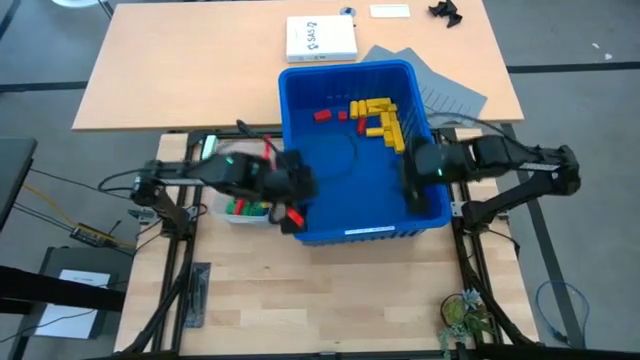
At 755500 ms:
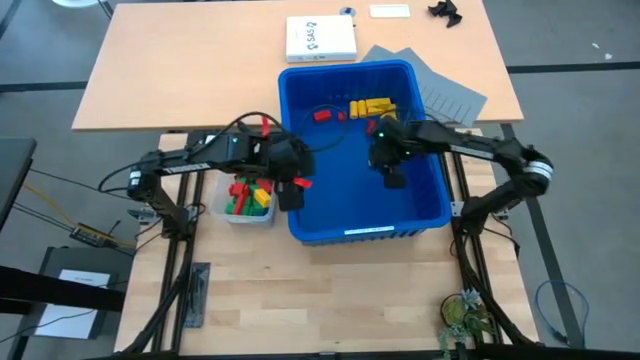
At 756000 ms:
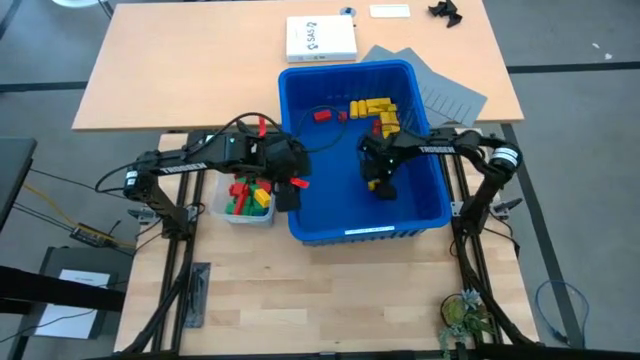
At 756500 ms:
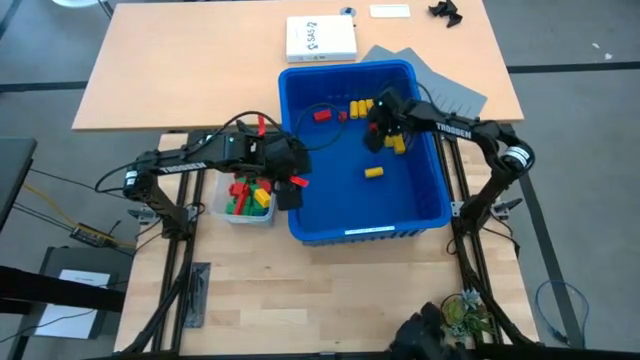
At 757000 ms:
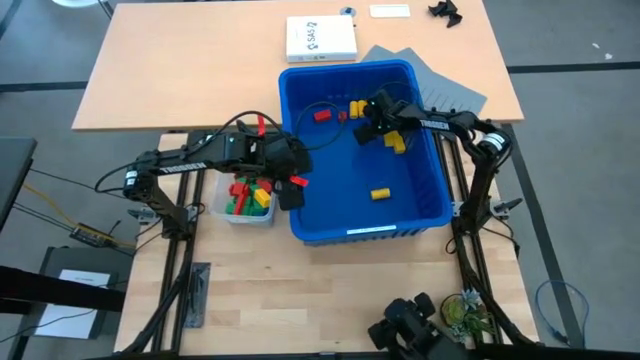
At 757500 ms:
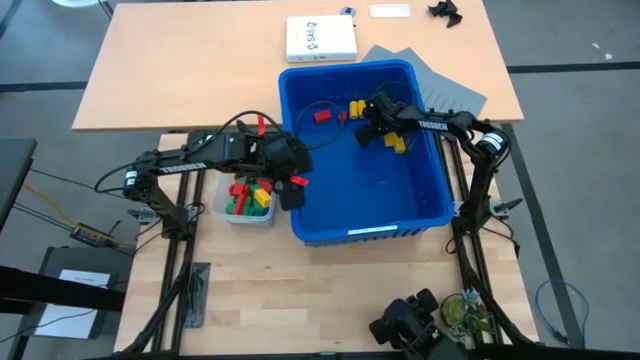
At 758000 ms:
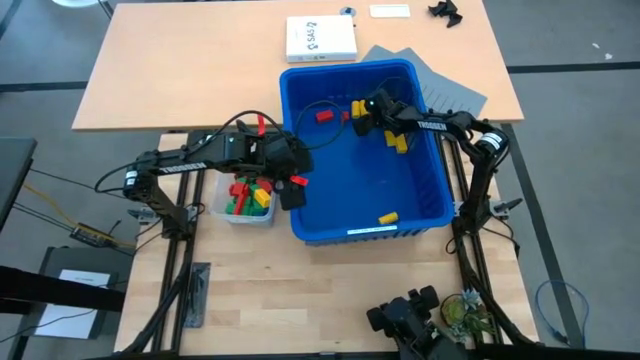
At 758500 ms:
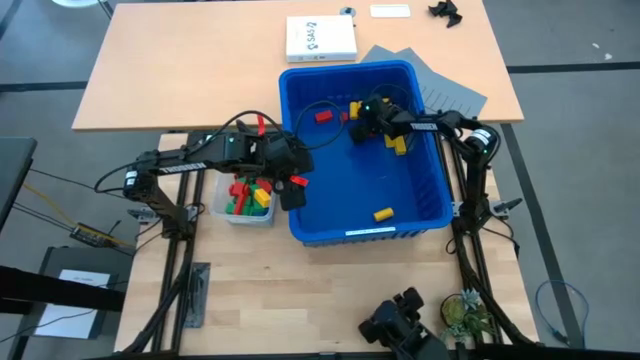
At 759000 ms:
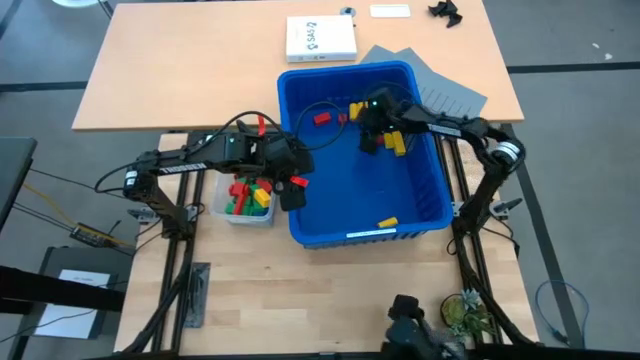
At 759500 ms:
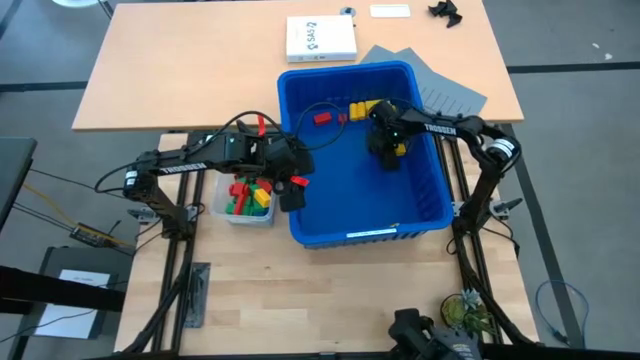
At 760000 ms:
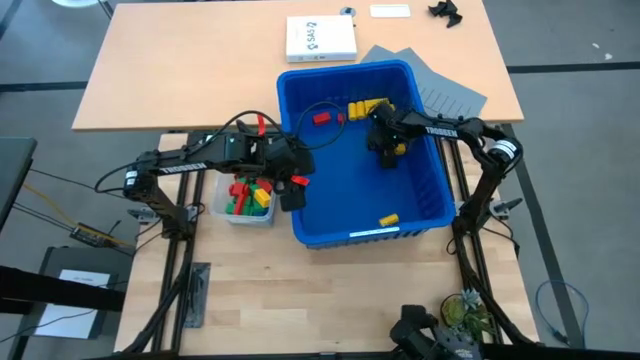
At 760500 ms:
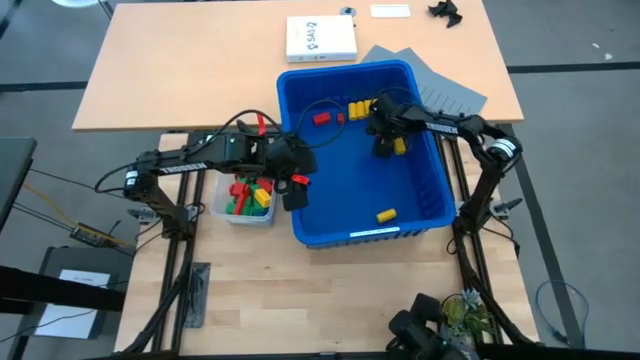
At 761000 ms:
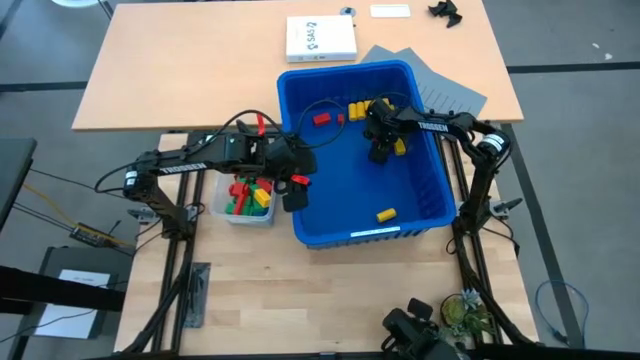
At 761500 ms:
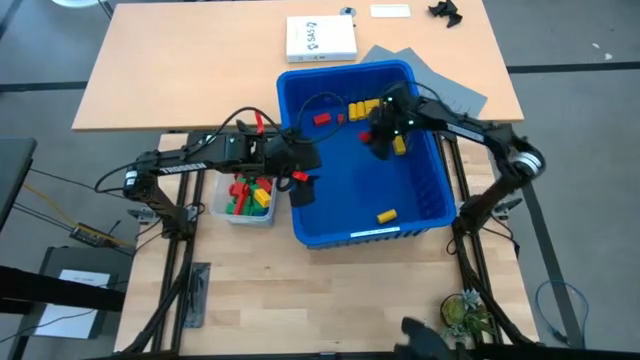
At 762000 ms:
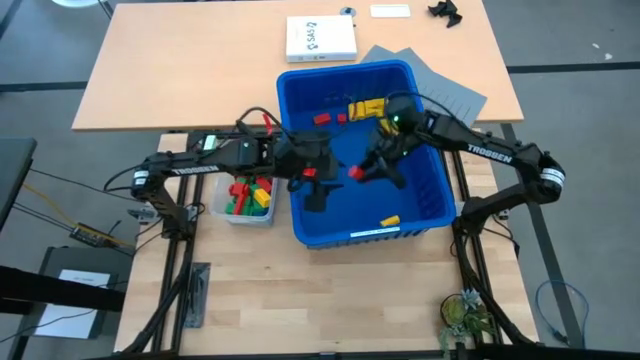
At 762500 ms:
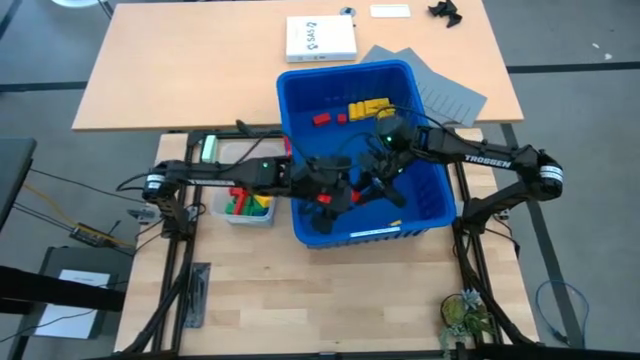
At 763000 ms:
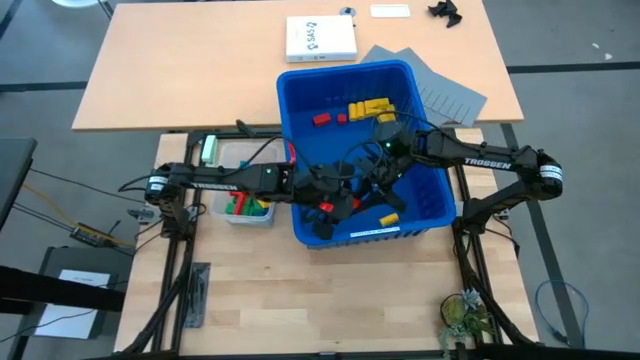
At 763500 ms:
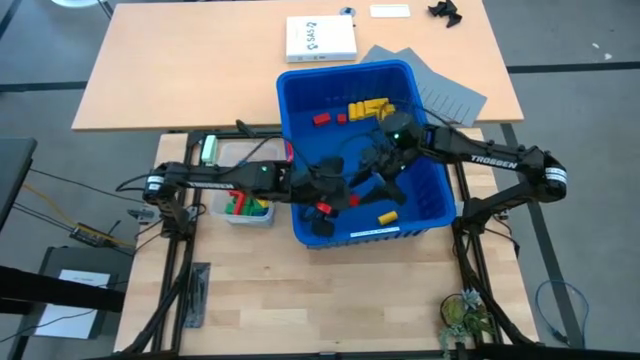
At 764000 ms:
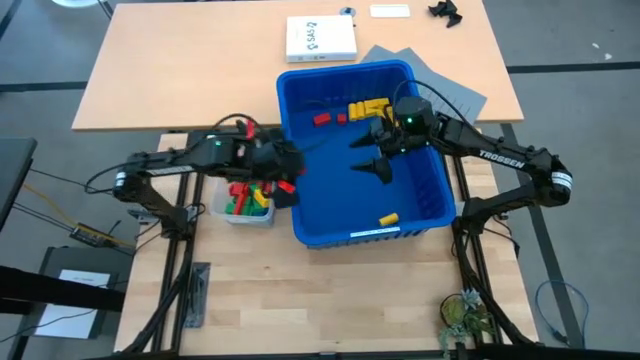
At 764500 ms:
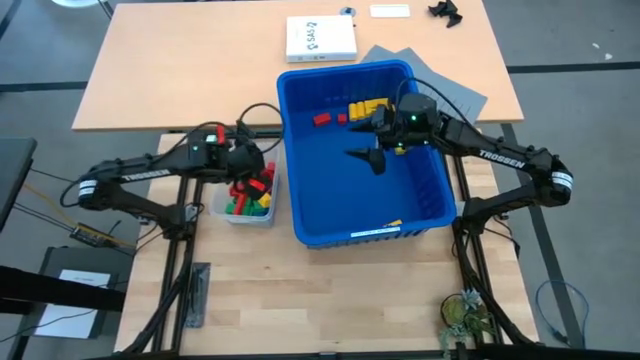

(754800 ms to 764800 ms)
Task: Sort blocks
Put the red block into the transparent bin

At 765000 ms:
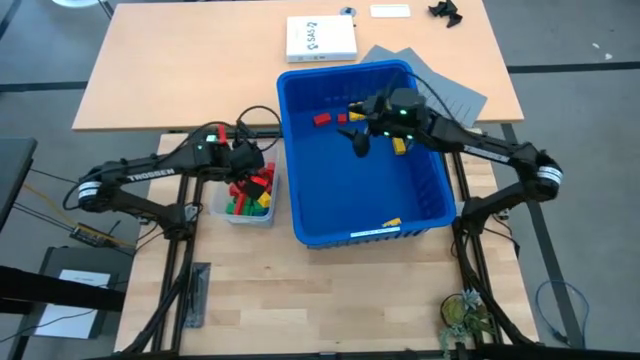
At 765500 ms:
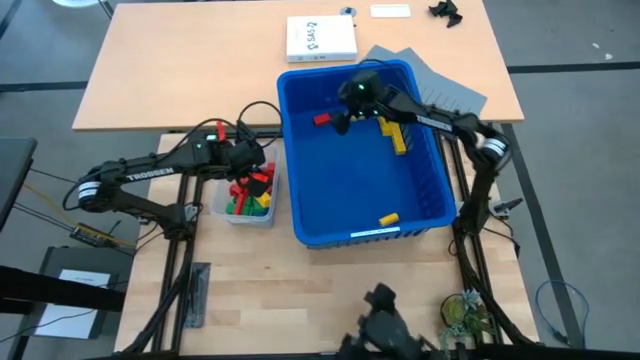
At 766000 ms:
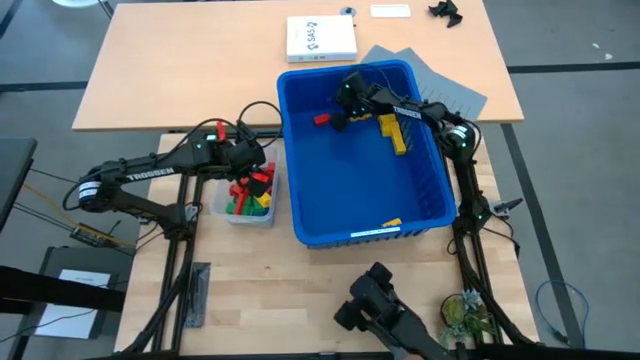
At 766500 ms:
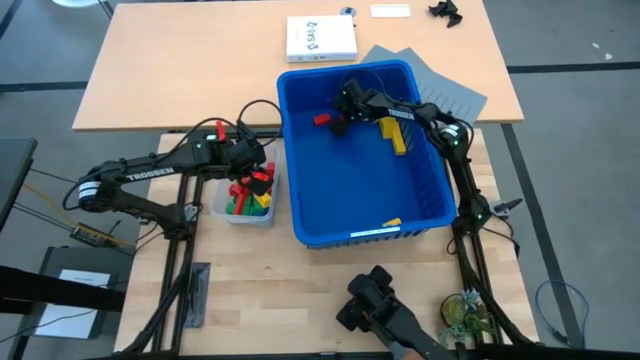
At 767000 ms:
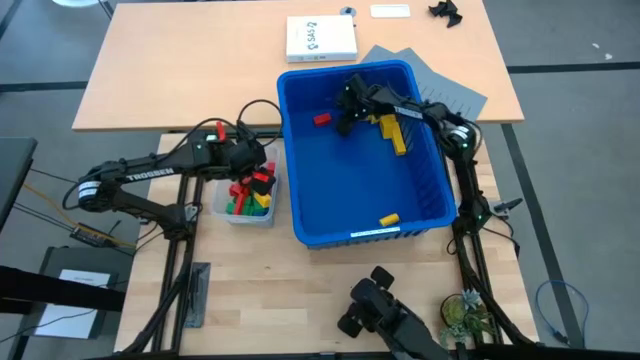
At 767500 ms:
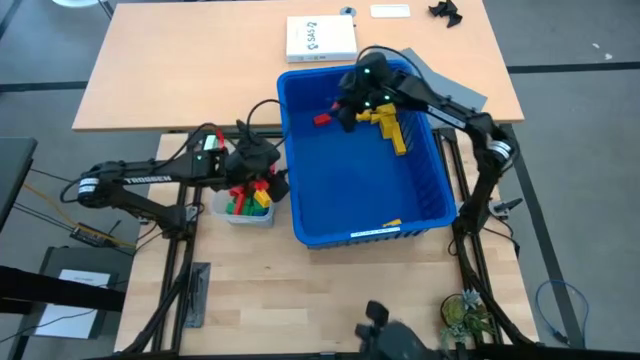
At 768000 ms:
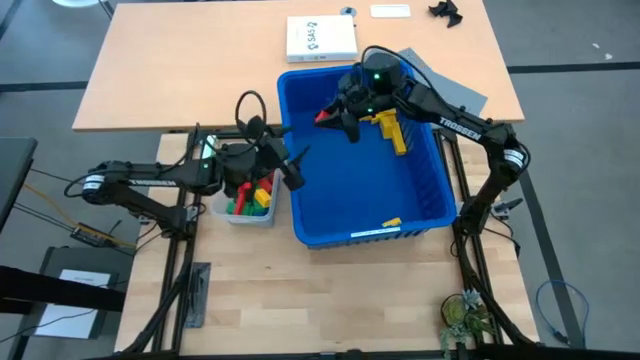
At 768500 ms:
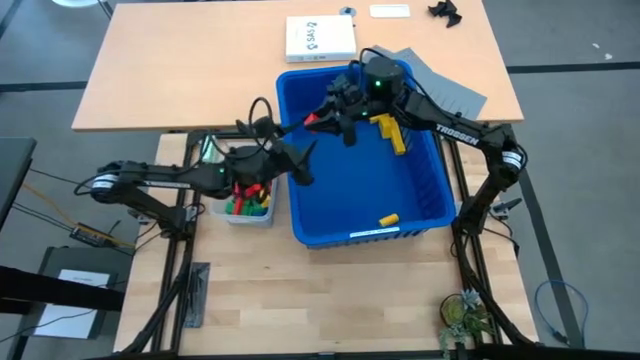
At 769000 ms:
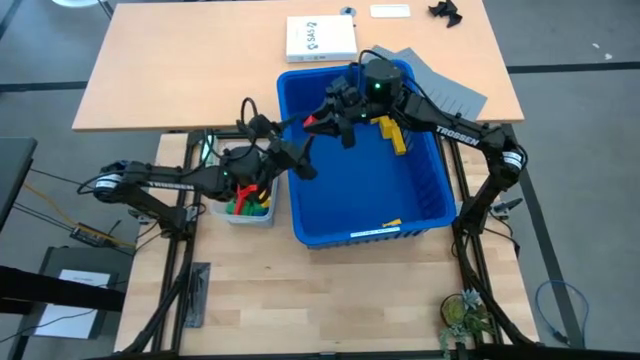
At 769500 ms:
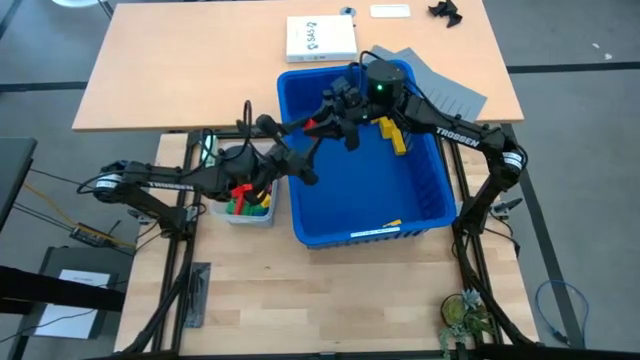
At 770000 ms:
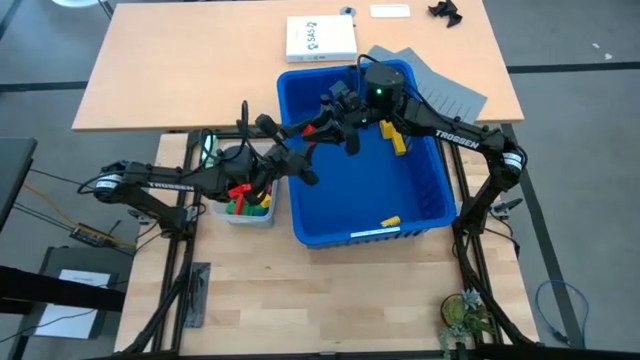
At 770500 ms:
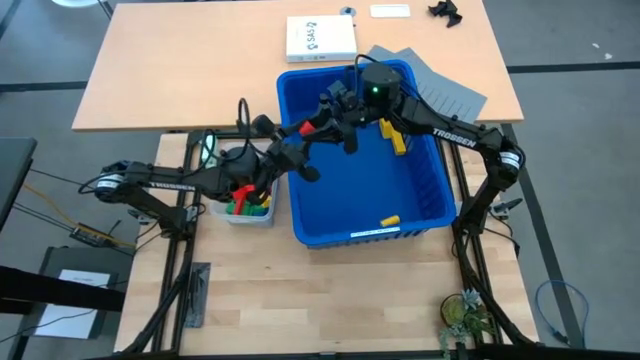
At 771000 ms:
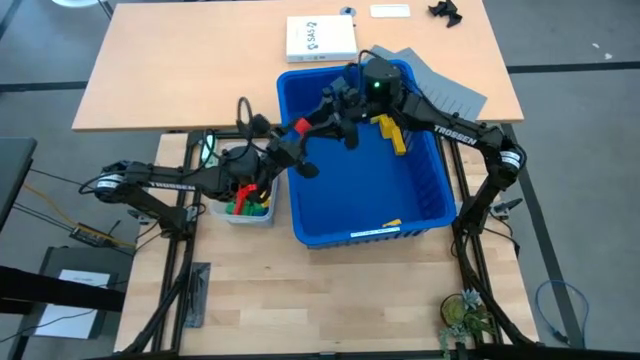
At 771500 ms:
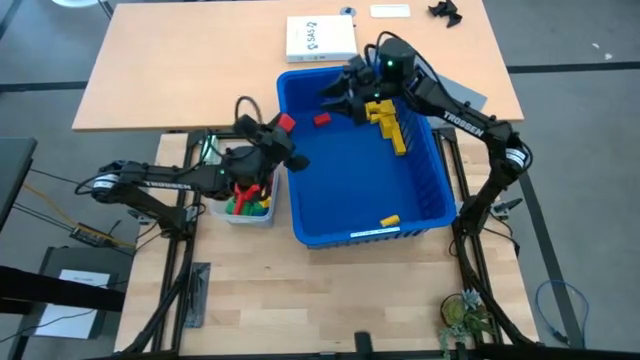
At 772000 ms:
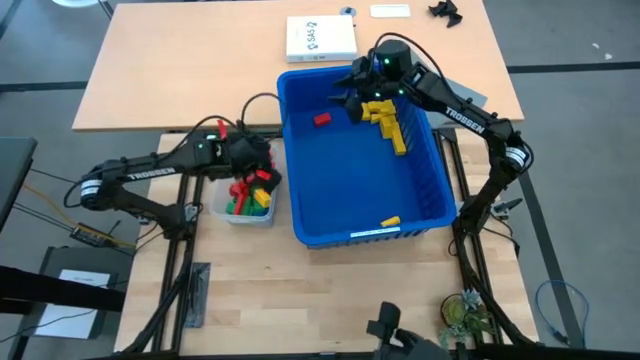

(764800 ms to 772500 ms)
Put the red block into the transparent bin

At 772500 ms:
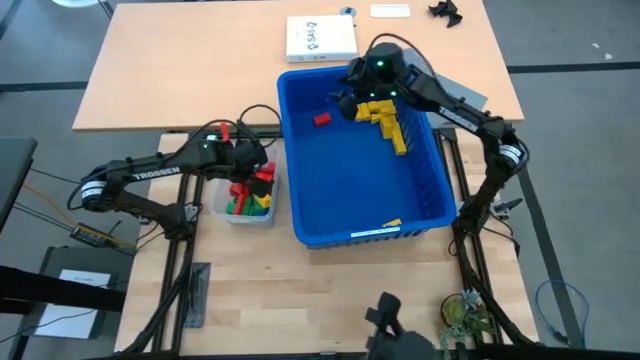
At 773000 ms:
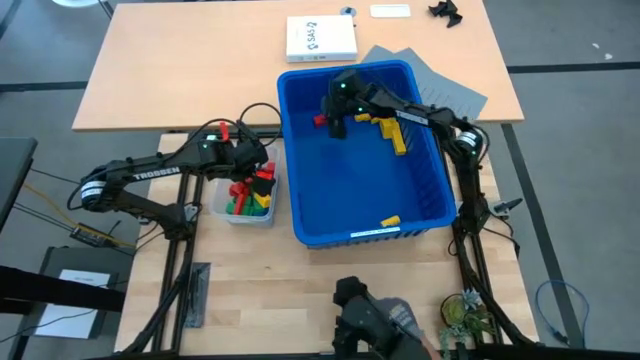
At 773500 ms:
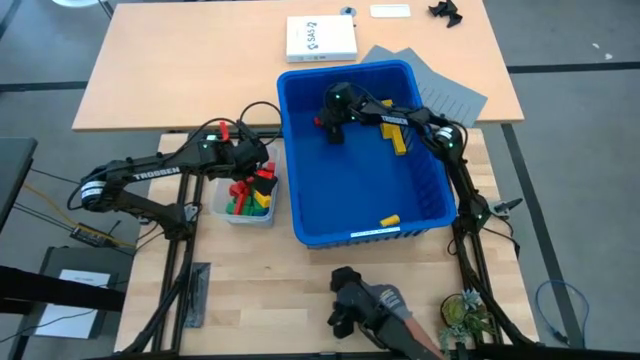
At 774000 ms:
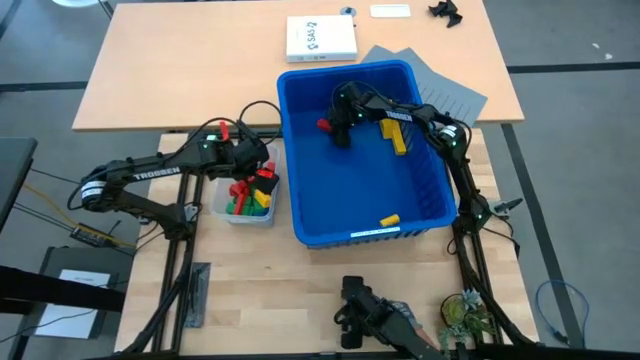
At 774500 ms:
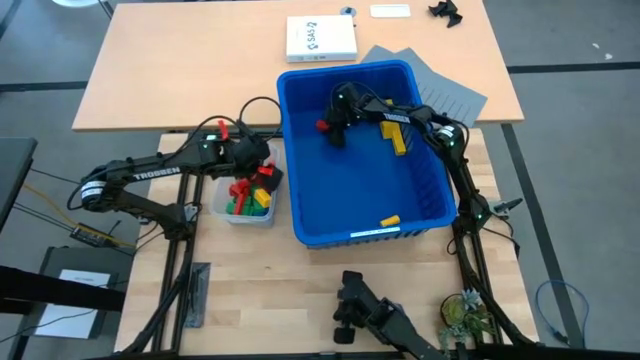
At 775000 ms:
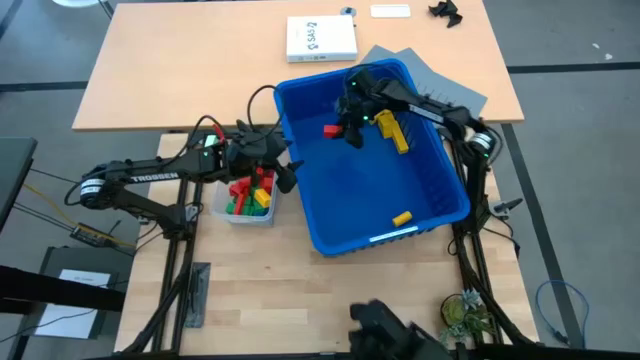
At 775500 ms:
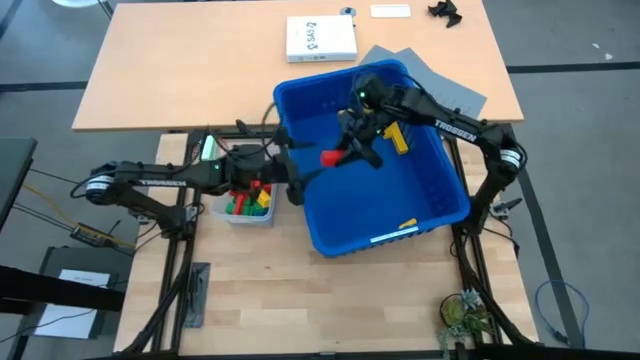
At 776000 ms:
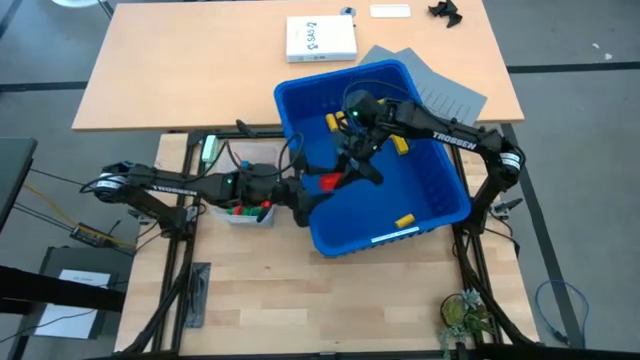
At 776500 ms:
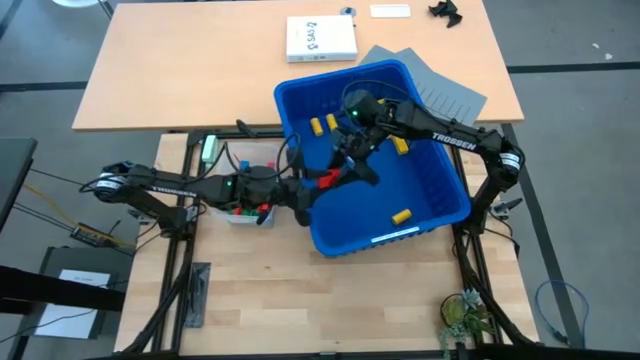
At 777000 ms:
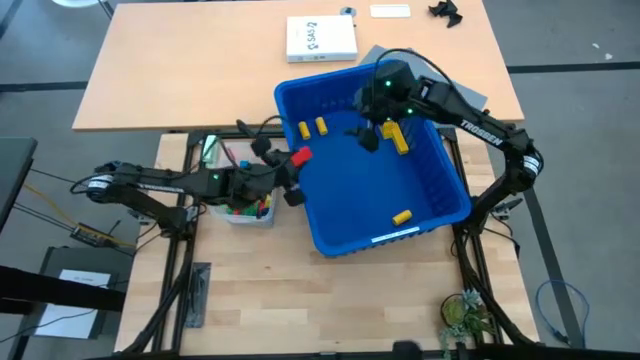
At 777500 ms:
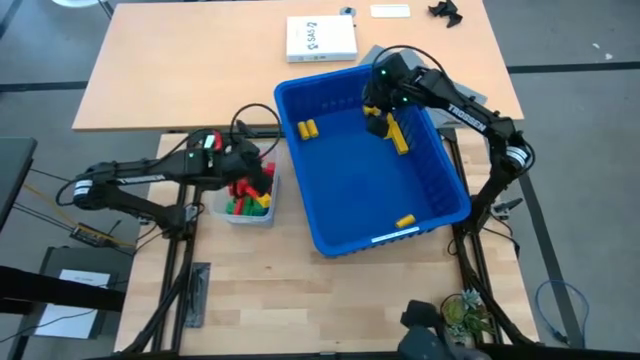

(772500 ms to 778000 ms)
Put the red block into the transparent bin
